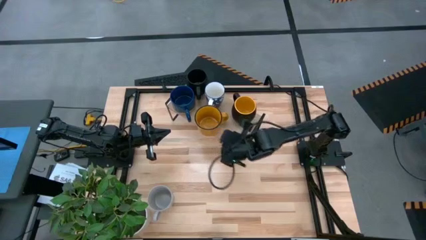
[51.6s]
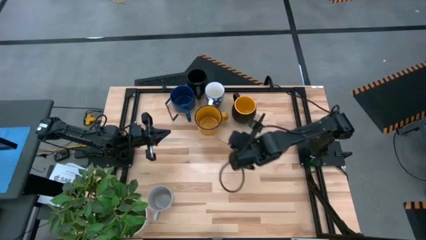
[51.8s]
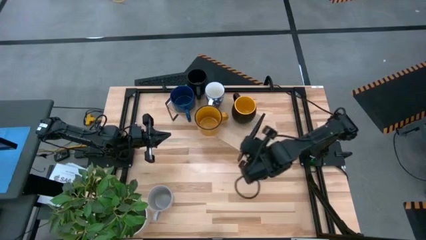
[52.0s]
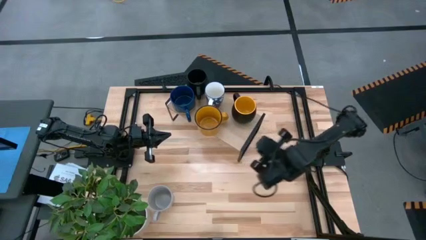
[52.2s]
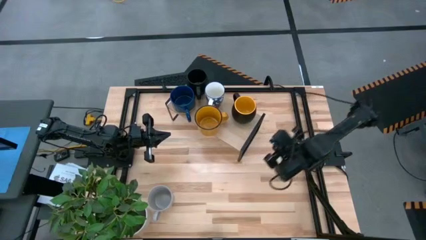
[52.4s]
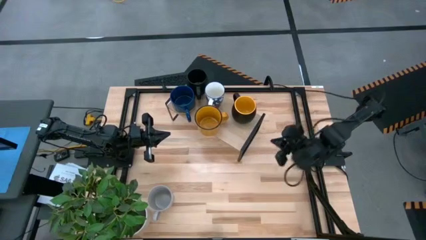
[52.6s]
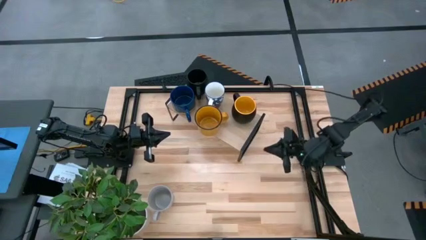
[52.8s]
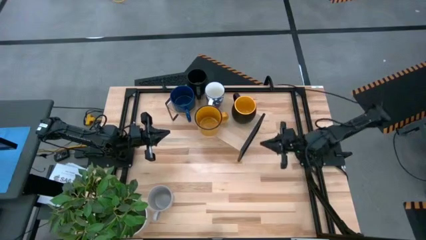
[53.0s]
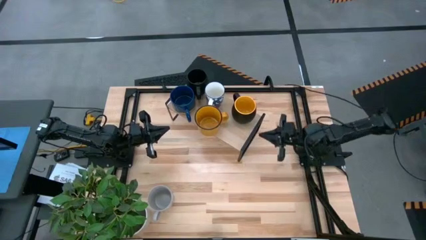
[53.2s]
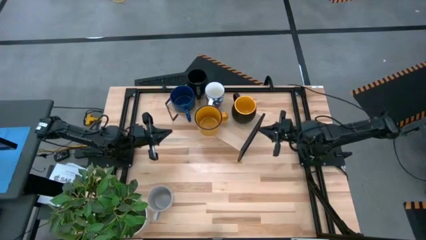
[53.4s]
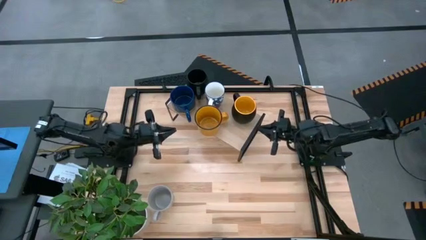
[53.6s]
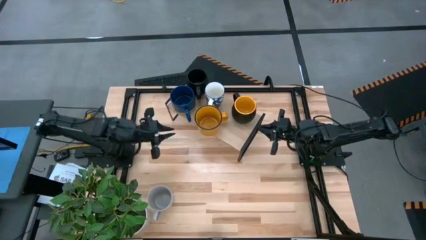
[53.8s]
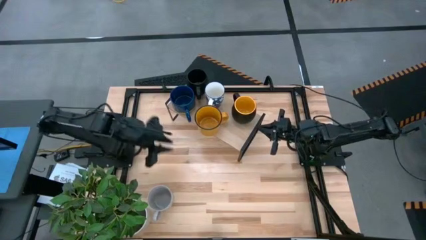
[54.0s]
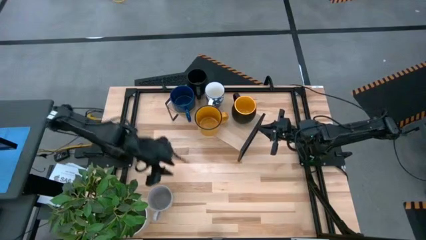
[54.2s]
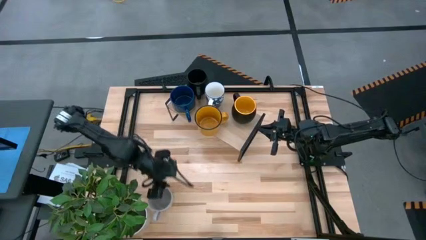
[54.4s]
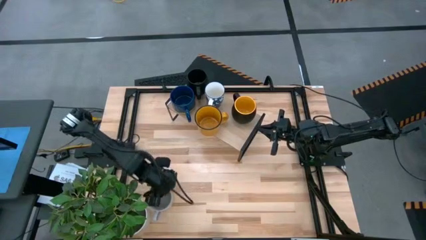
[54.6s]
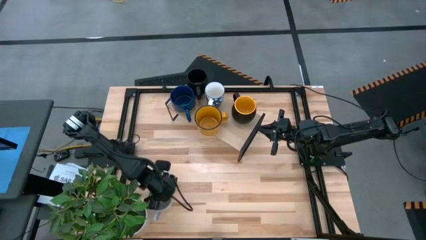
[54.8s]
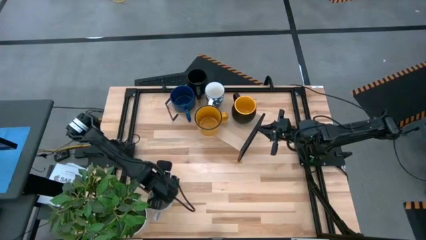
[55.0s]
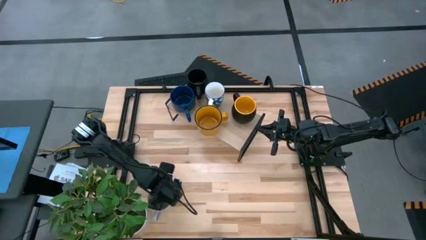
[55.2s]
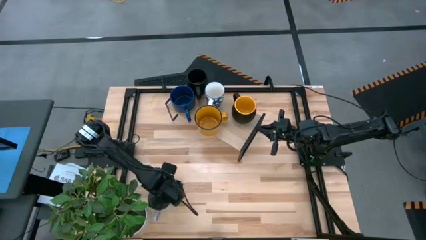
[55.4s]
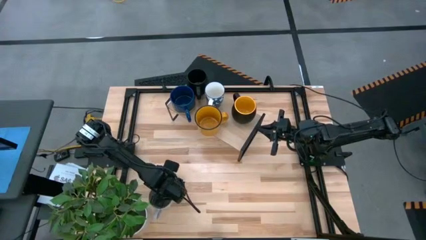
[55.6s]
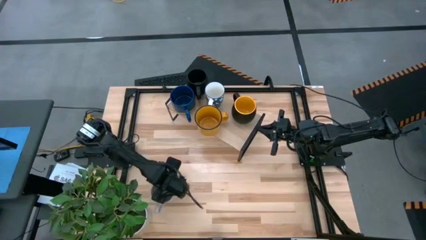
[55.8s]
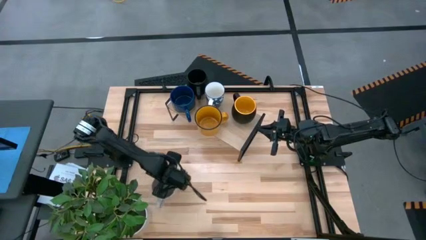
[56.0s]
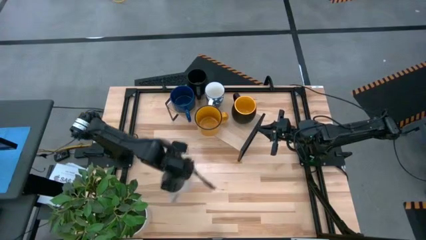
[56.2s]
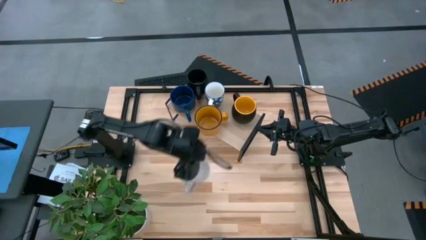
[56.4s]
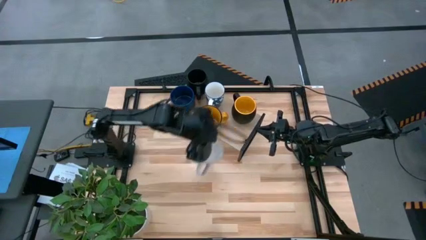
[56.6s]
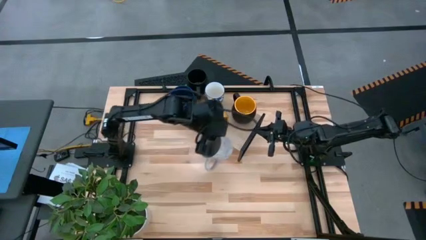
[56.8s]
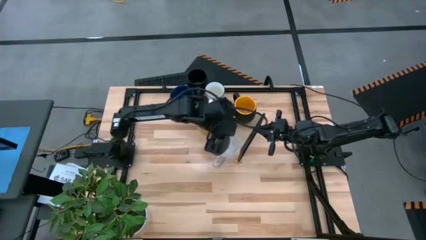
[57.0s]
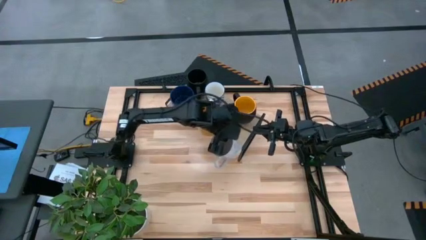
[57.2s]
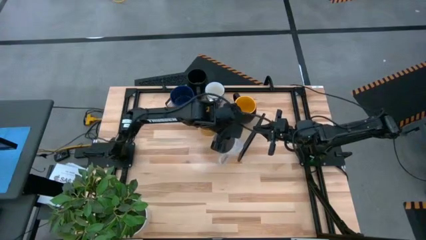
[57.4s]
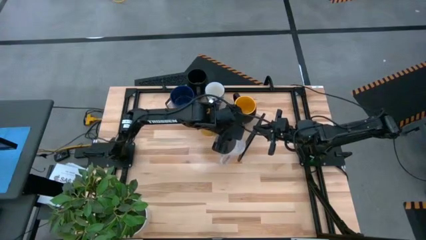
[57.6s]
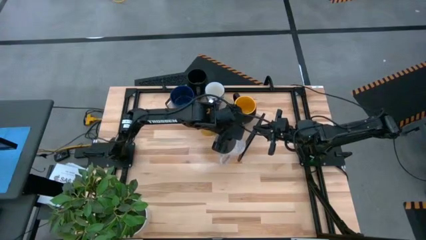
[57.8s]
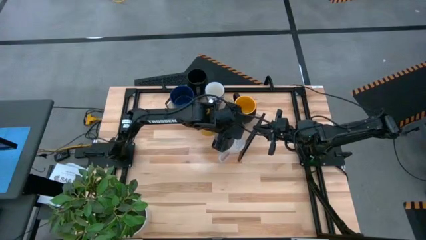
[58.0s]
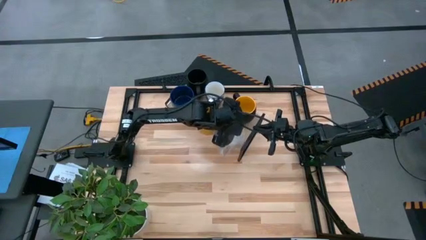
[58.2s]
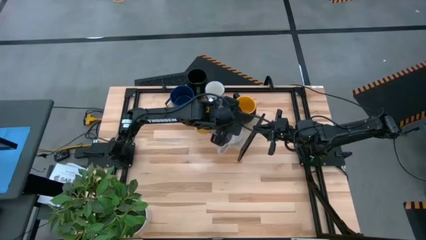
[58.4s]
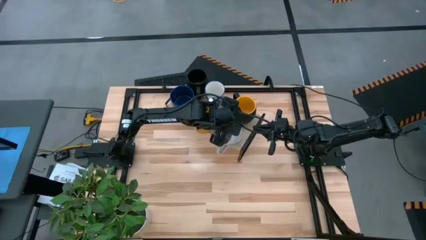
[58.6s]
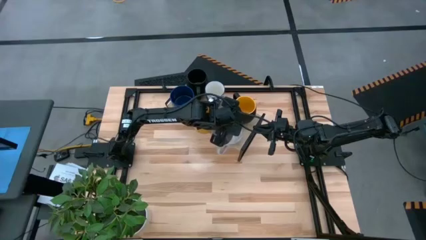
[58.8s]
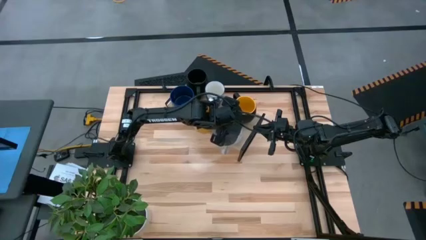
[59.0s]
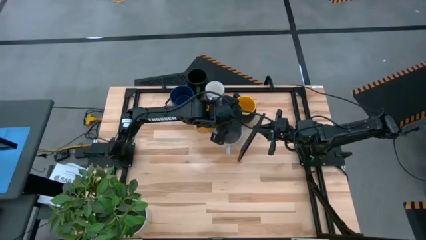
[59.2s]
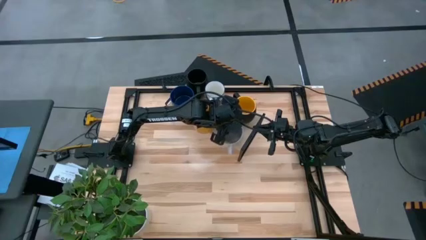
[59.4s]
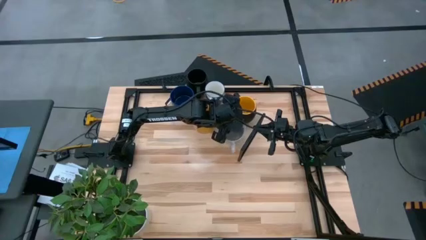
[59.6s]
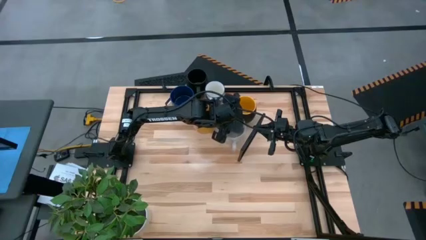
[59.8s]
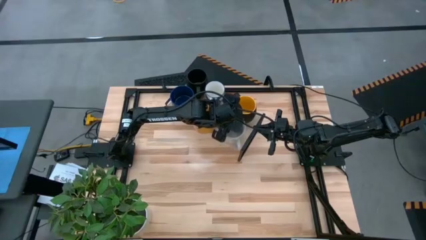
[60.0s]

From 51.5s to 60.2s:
Task: Place coffee mugs
Put the gray mug on the shelf

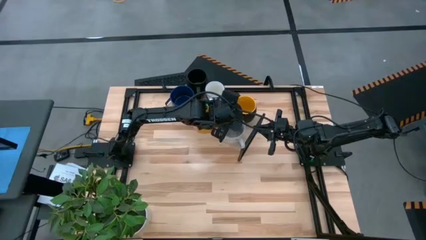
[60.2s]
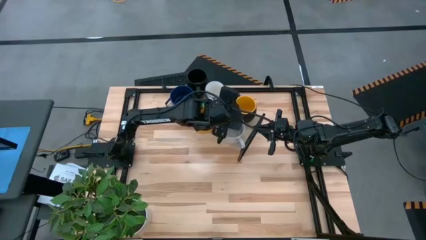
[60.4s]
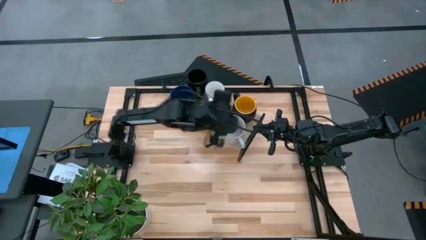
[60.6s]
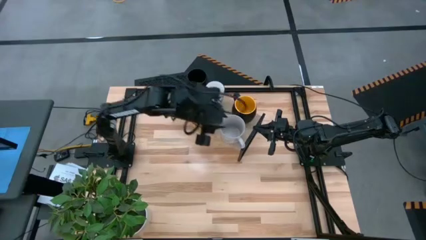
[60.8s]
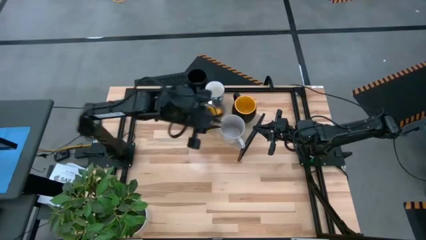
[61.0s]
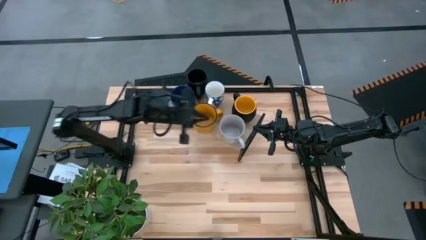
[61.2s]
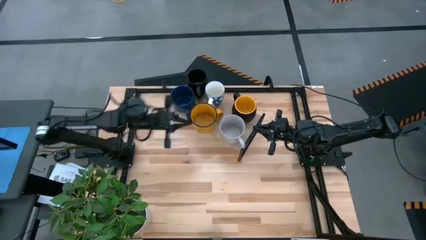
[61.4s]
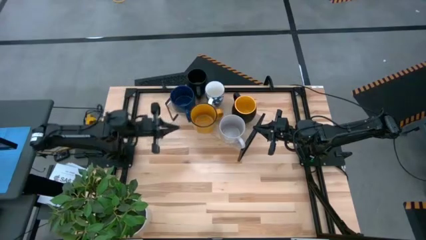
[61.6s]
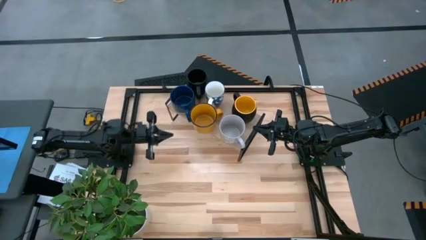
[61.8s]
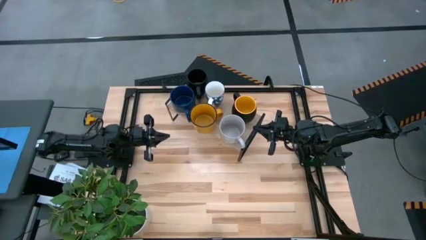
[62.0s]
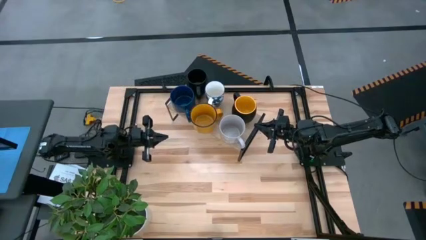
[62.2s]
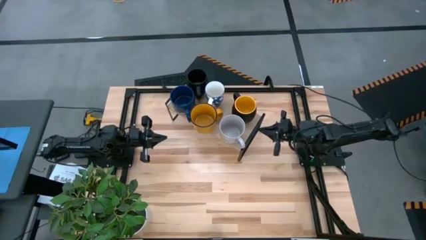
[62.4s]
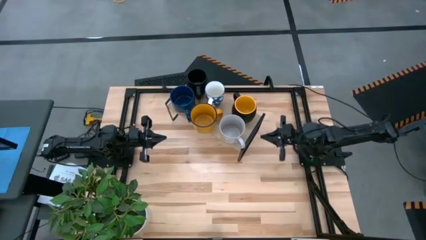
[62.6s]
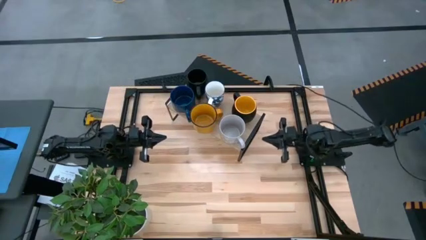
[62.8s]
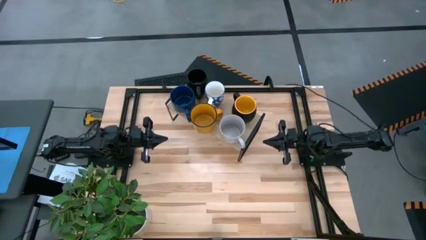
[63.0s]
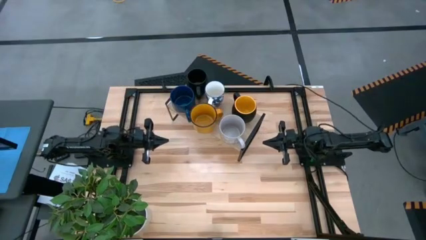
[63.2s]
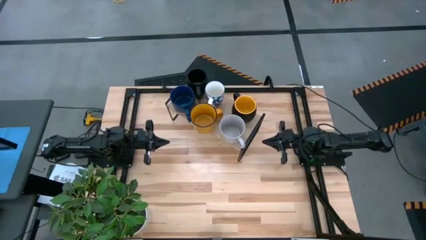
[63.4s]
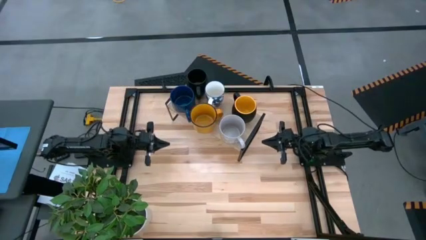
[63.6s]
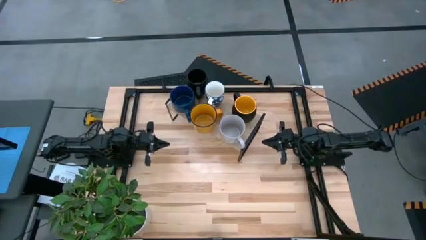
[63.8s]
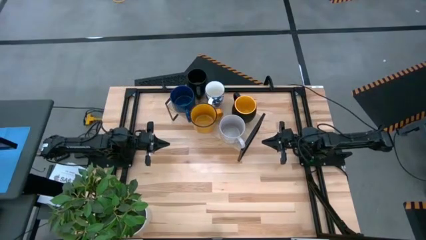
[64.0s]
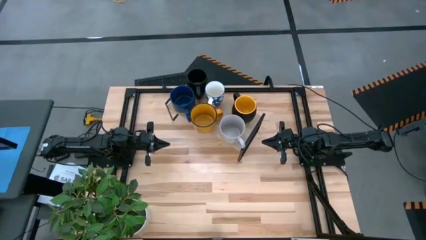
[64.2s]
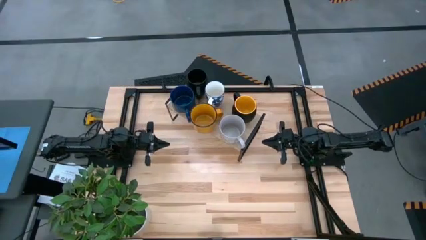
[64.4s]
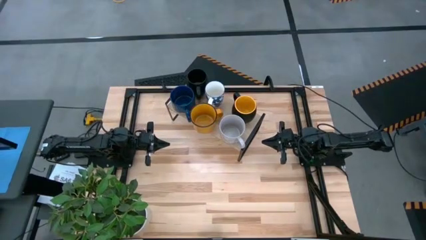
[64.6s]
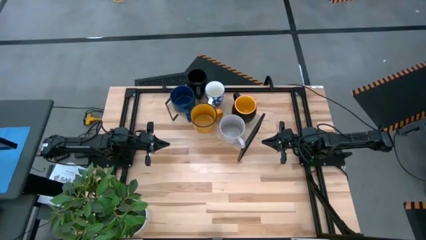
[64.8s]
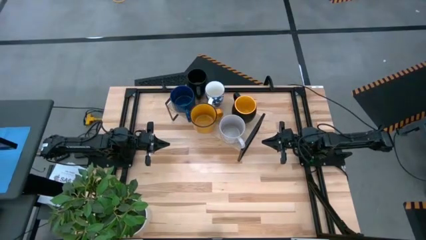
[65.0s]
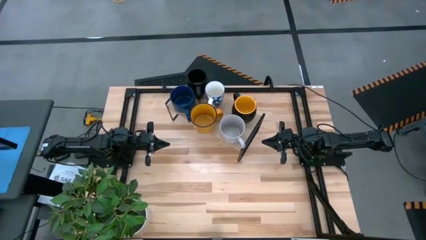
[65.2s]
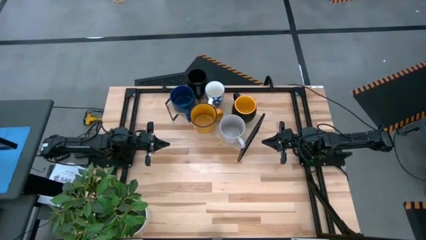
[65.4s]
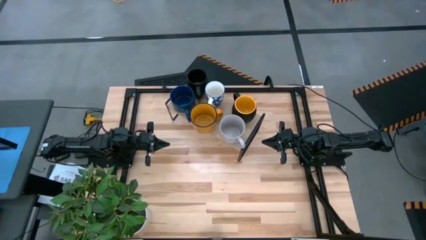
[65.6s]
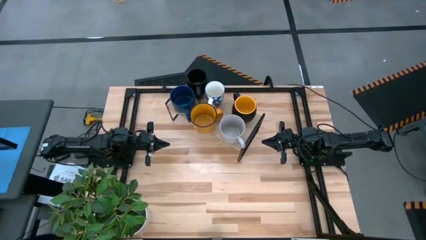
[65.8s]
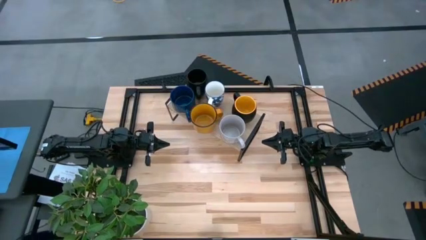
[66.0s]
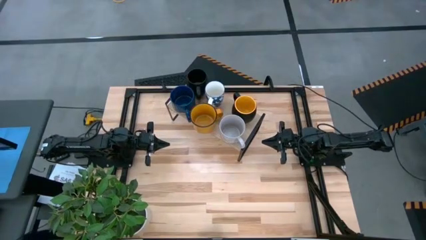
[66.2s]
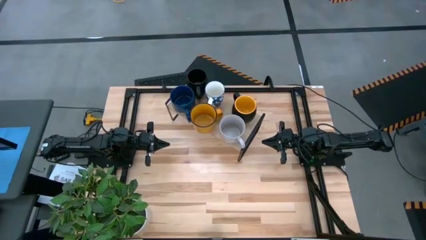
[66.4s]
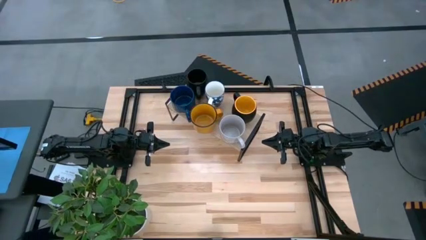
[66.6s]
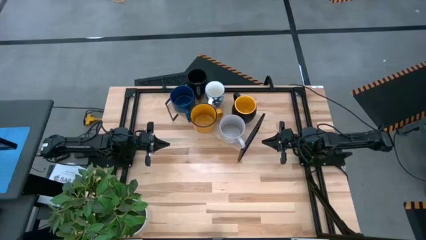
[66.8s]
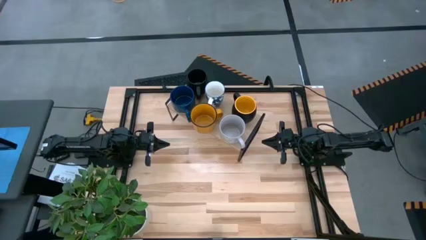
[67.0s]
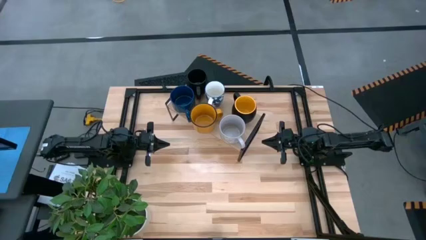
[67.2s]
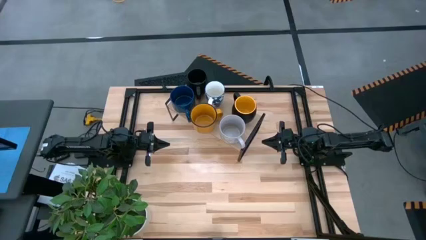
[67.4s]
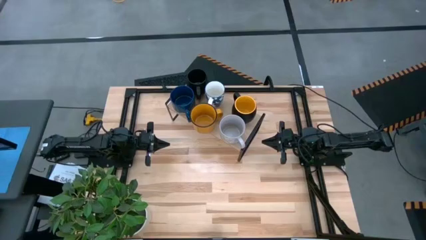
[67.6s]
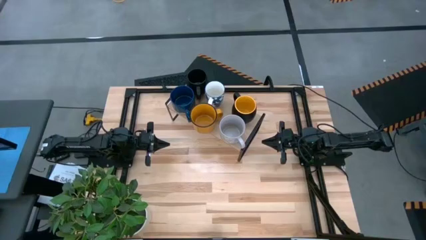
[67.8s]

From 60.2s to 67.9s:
Return to Home Position

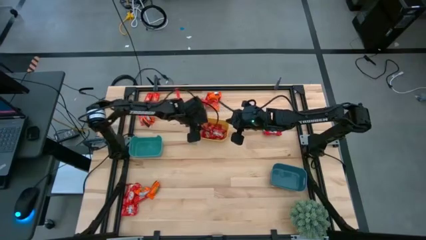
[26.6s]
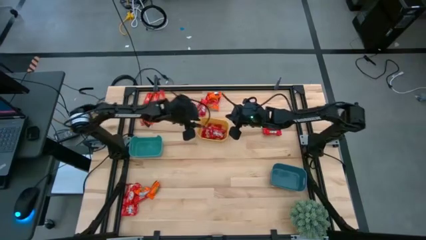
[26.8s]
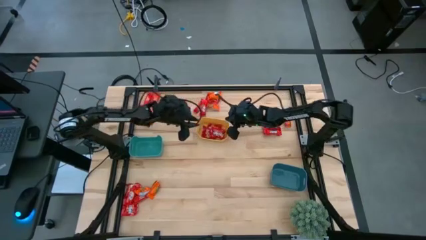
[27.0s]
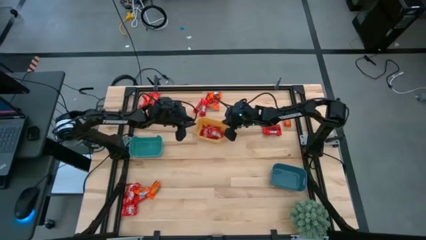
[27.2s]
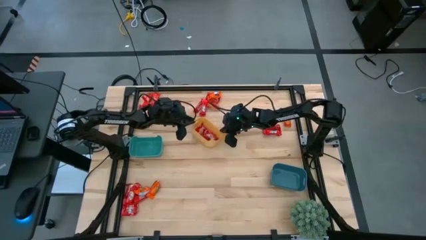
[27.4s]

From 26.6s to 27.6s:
Task: Sort candy
Adjust the yellow bin
